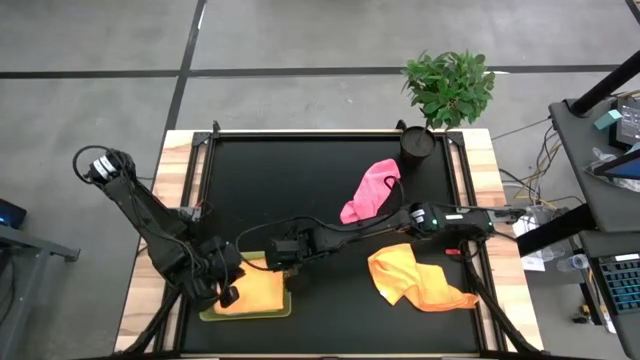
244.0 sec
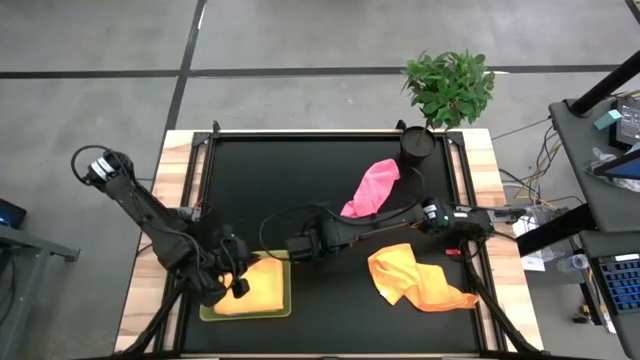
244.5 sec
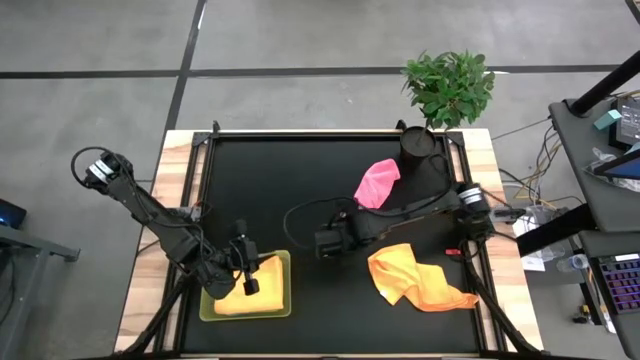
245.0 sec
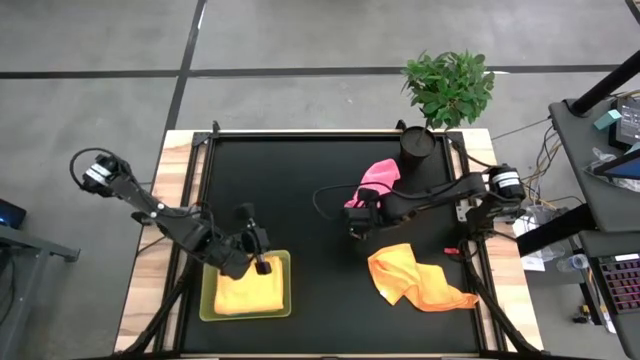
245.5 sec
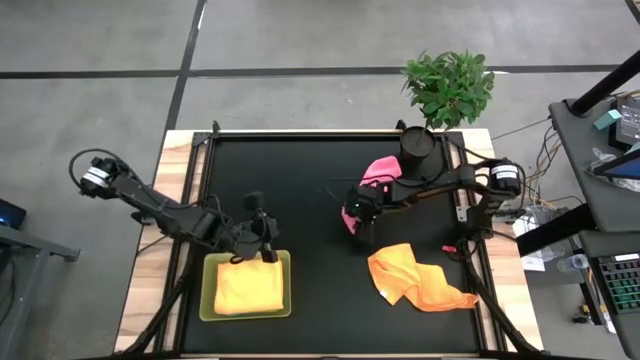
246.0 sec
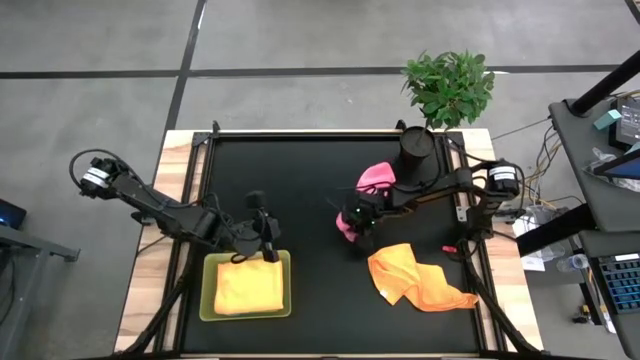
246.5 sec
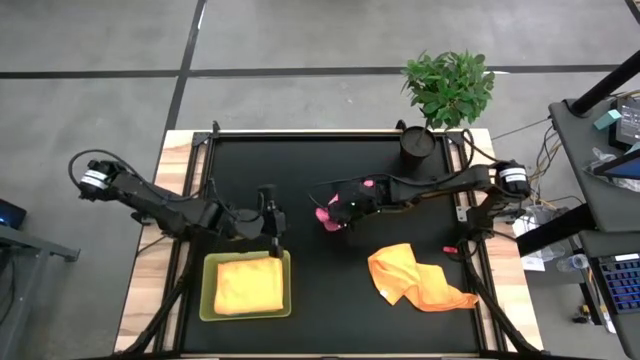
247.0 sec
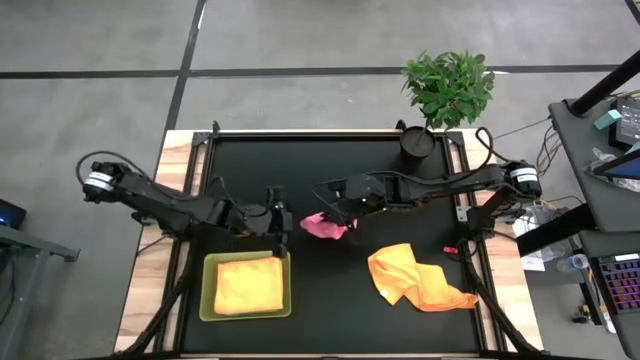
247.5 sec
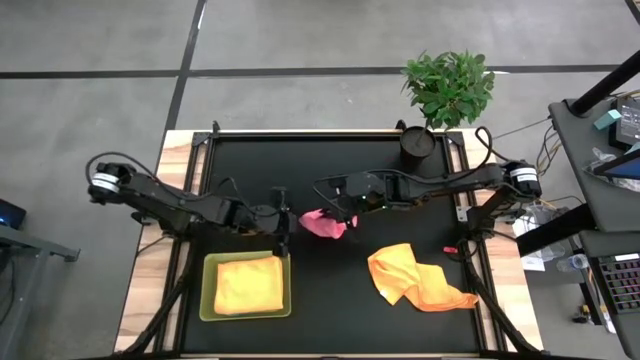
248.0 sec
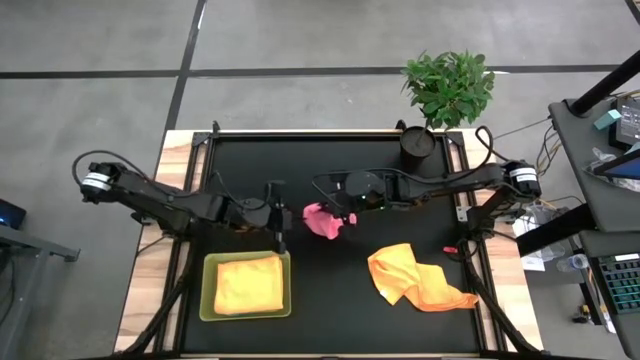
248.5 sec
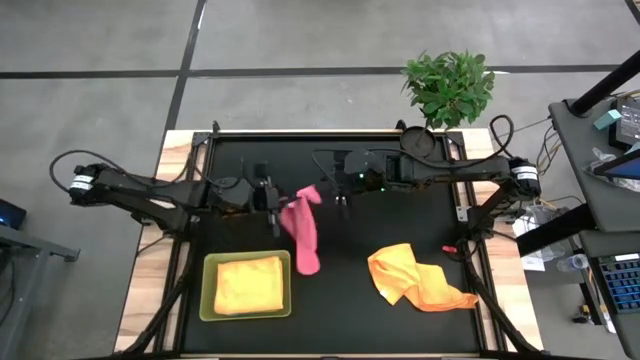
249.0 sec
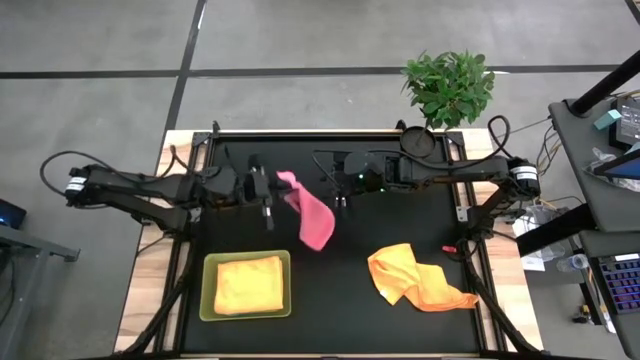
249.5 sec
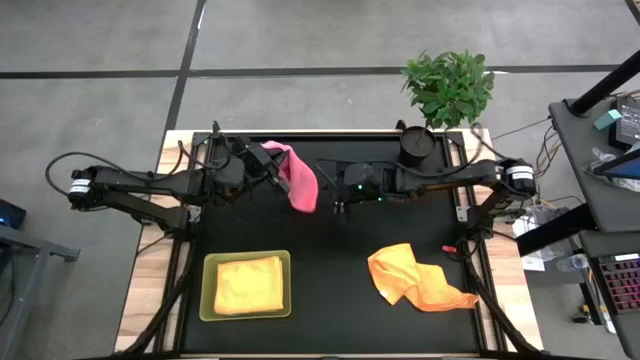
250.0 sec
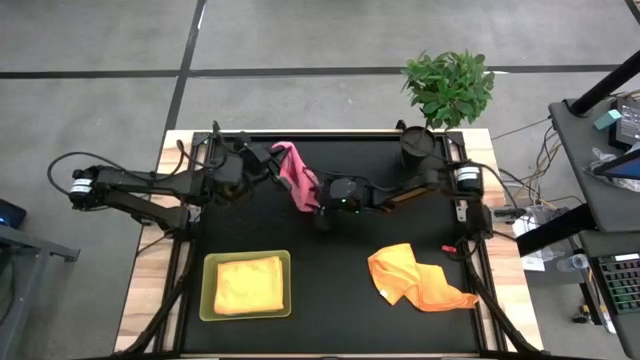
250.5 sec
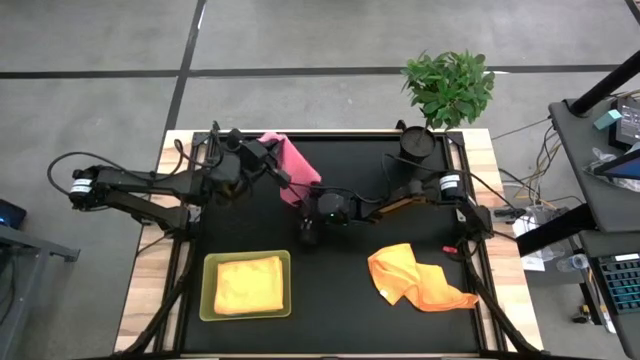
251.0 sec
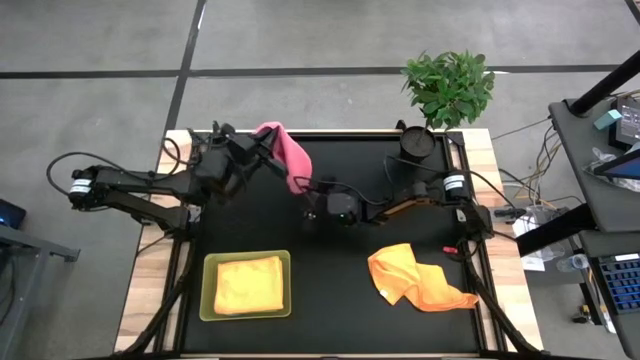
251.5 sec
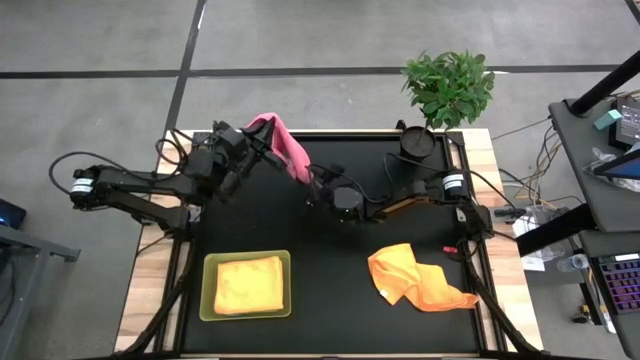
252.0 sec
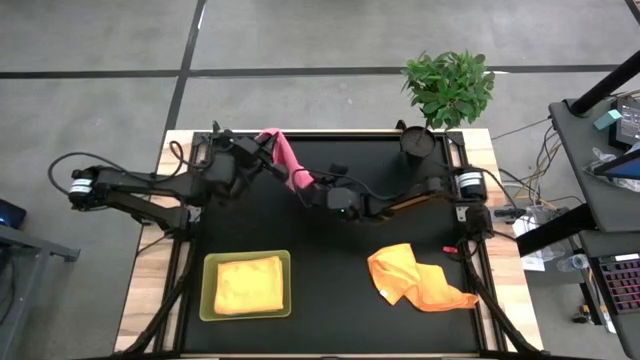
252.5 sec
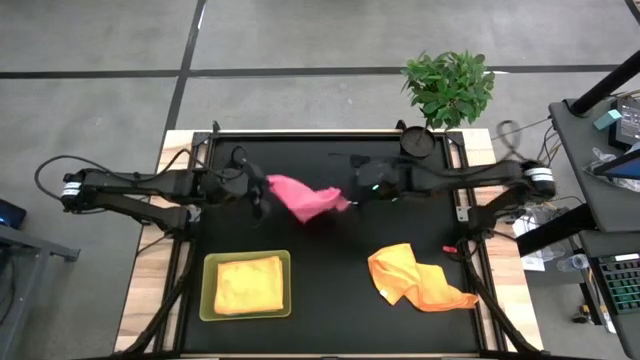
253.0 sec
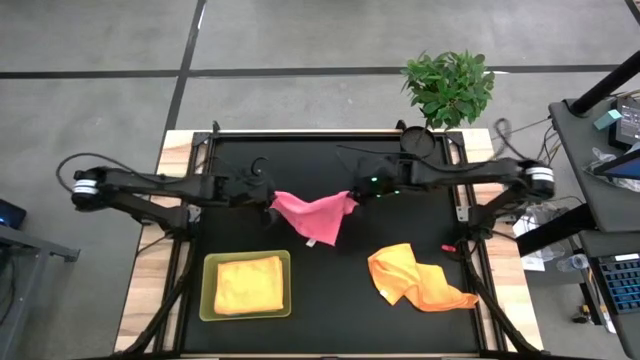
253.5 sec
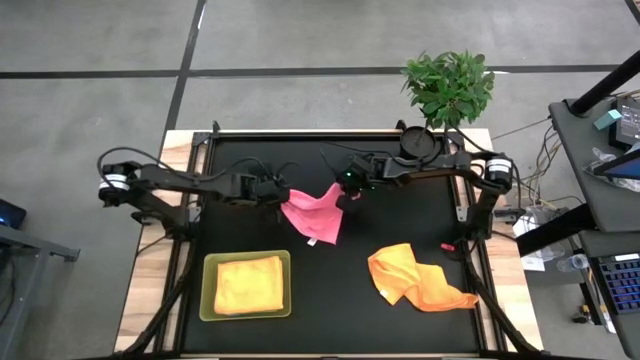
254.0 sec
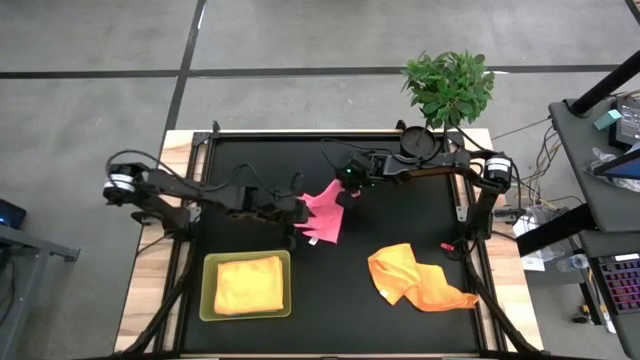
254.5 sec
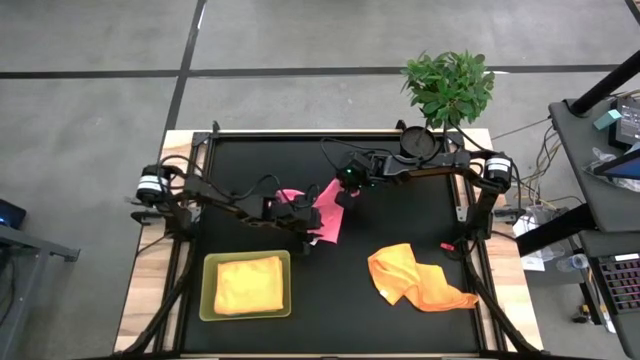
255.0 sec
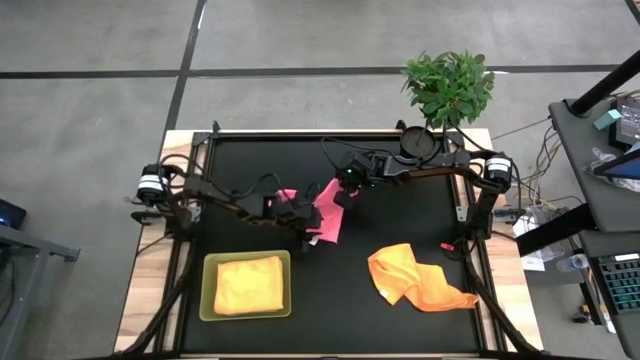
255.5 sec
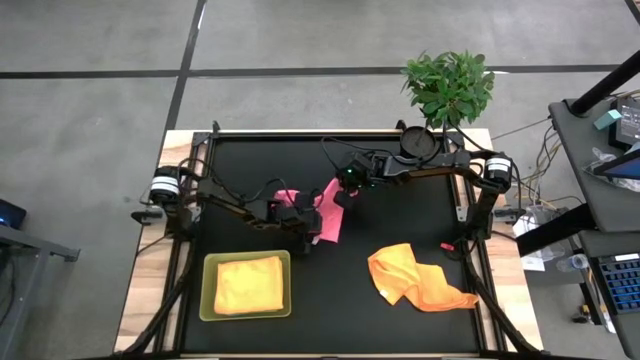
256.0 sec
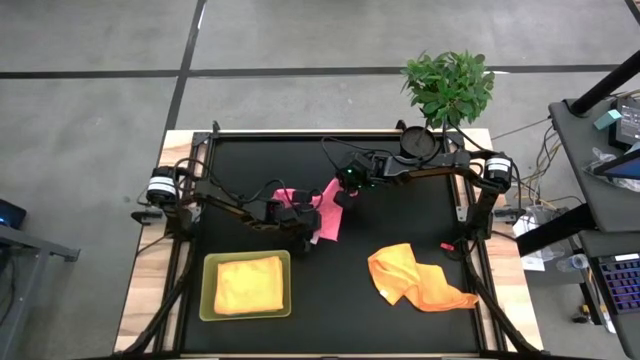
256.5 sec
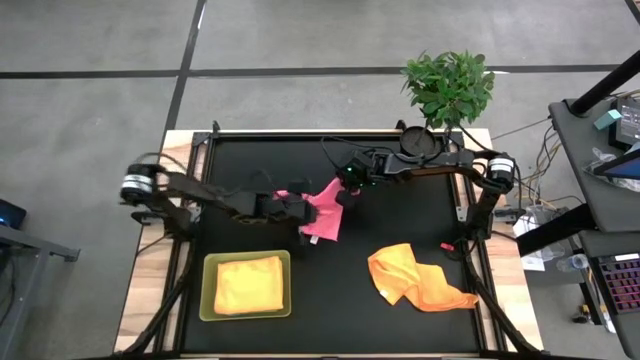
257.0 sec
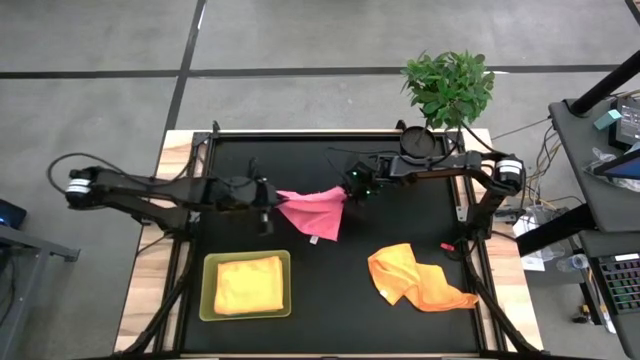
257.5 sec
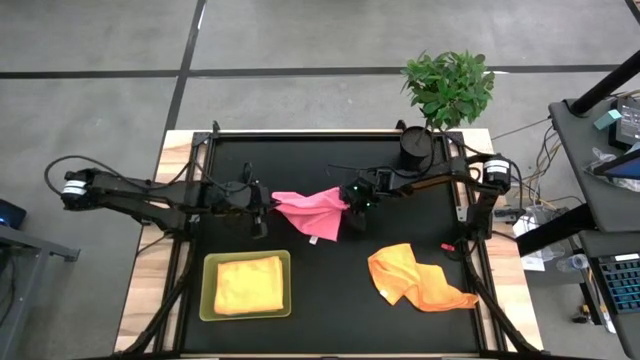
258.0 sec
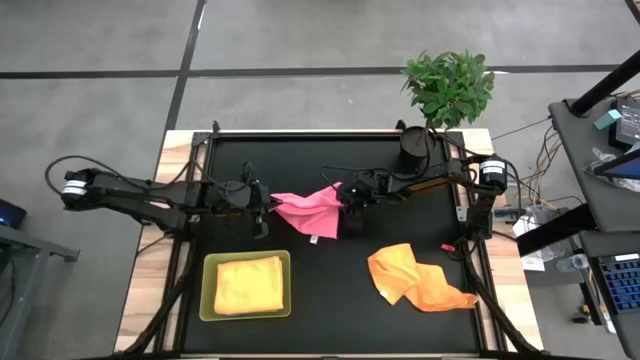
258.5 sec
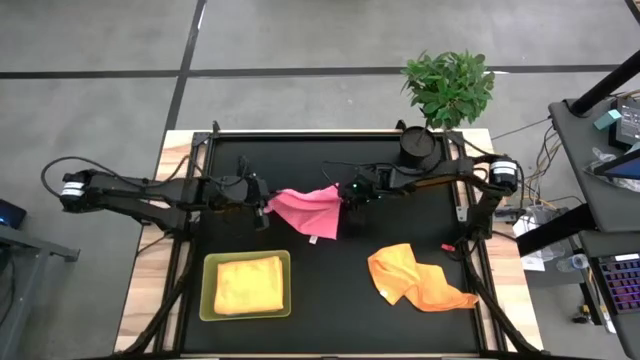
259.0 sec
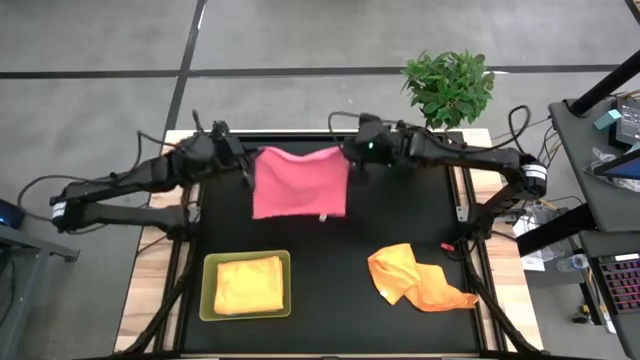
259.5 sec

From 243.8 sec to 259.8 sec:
Task: Fold microfiber towels
Fold the pink microfiber towel

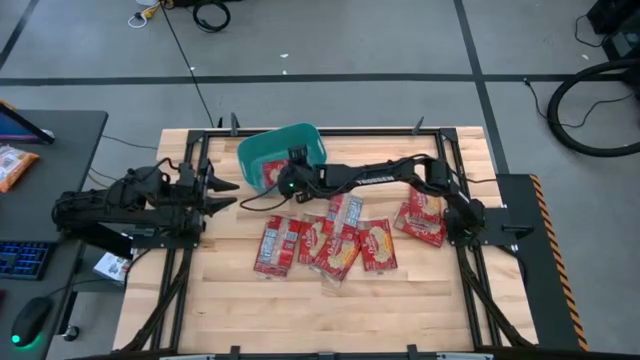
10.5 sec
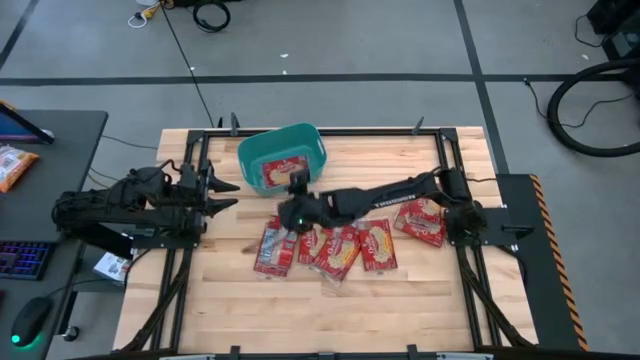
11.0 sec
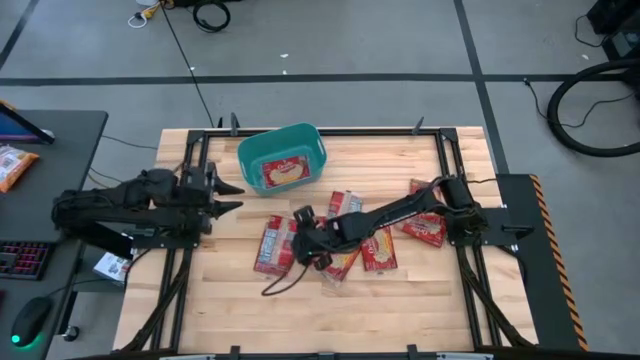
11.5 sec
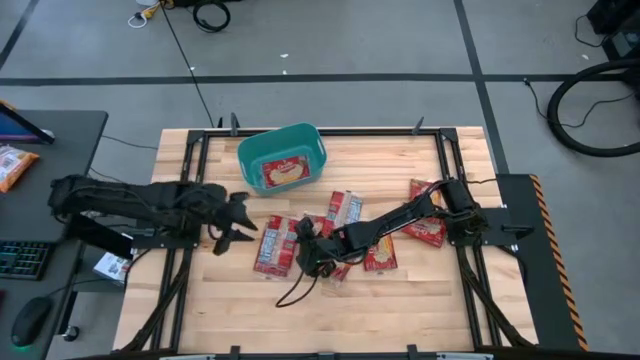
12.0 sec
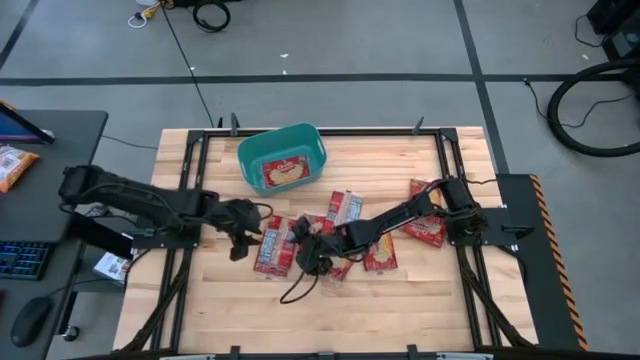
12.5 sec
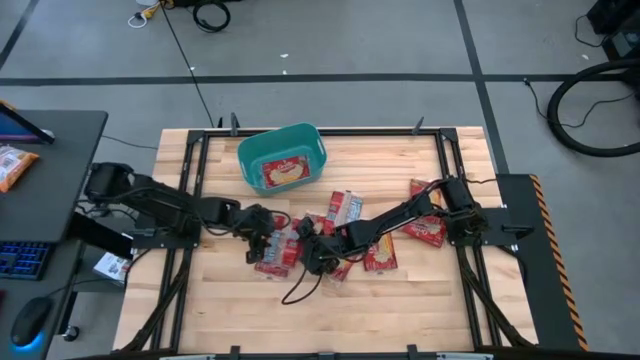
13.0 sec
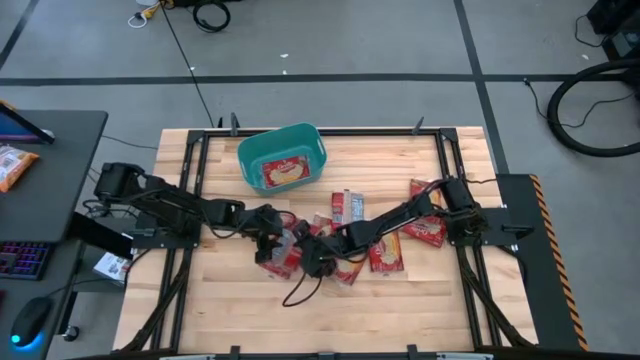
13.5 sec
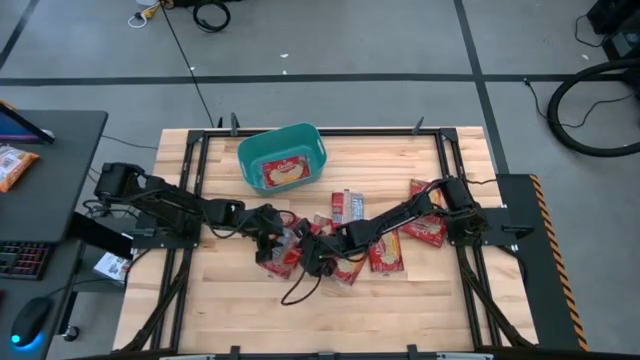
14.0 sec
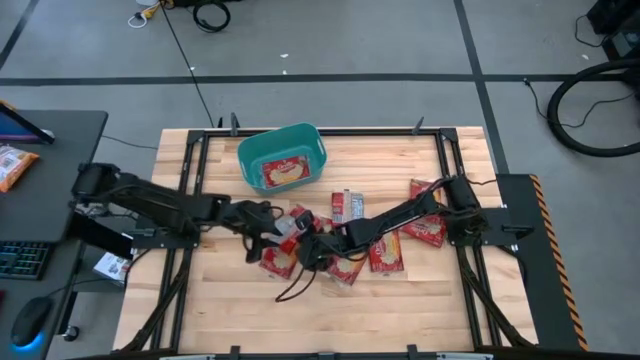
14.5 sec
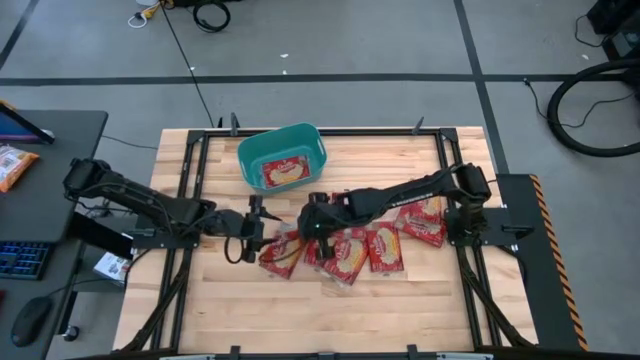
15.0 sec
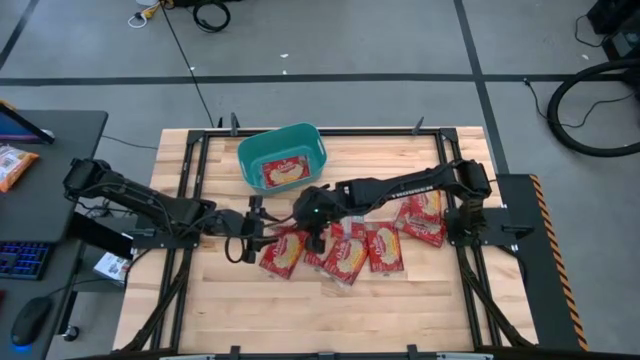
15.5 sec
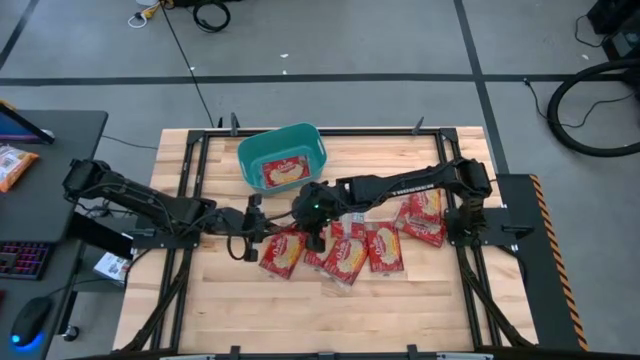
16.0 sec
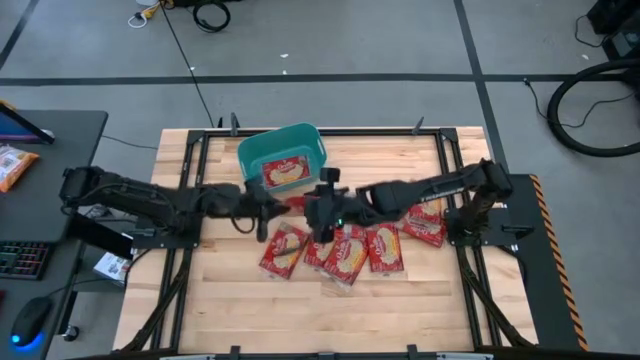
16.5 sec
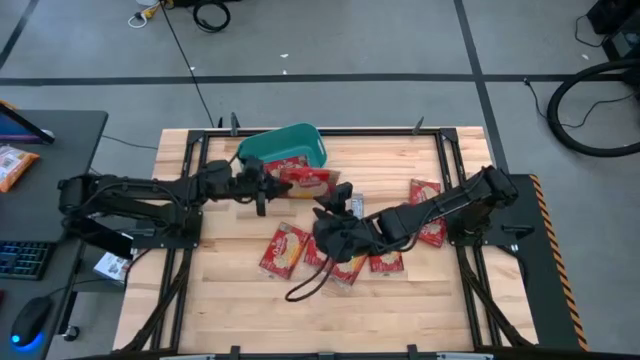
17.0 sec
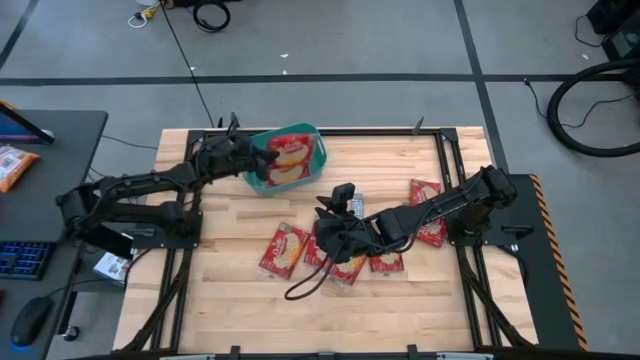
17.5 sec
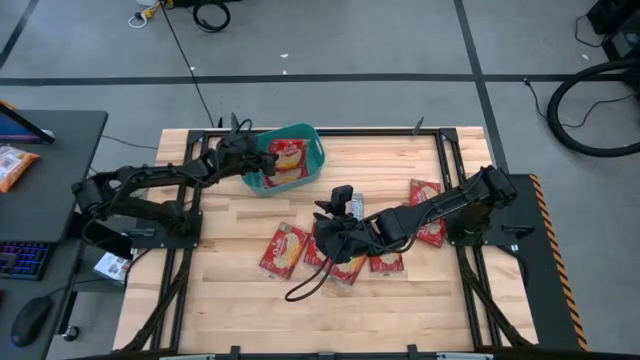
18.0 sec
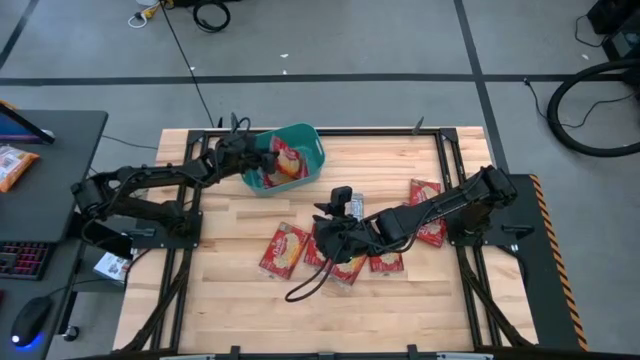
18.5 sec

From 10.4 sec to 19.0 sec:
Task: Sort popcorn bags into baskets
Put the red popcorn bag into the green bin
